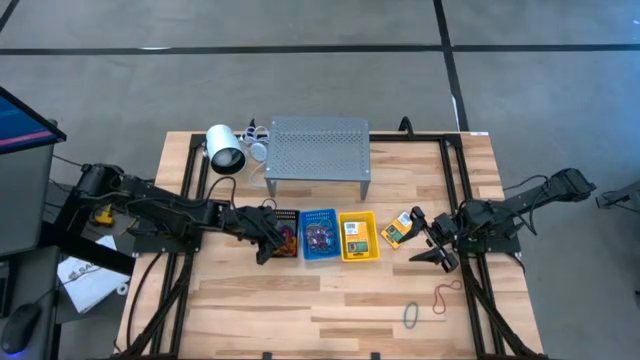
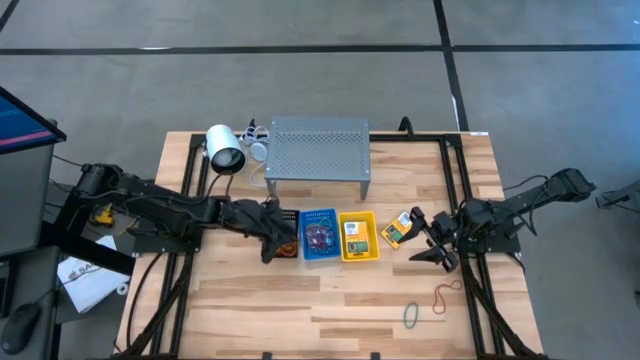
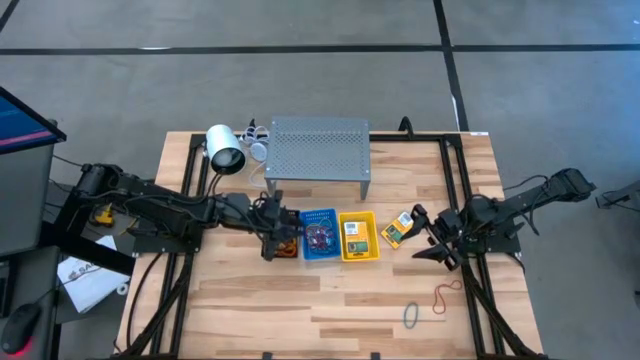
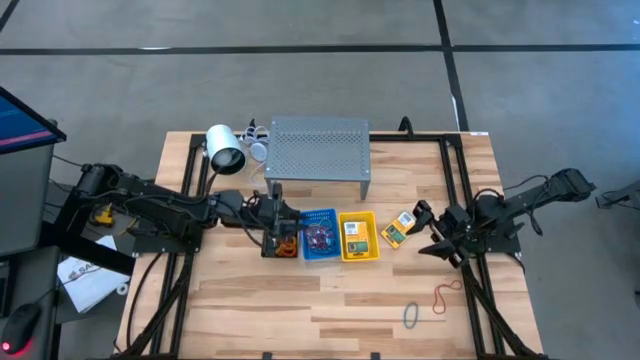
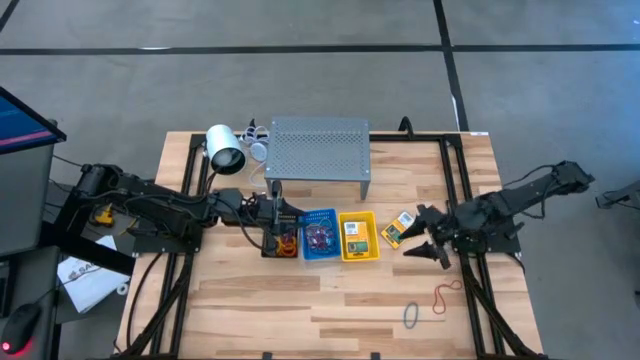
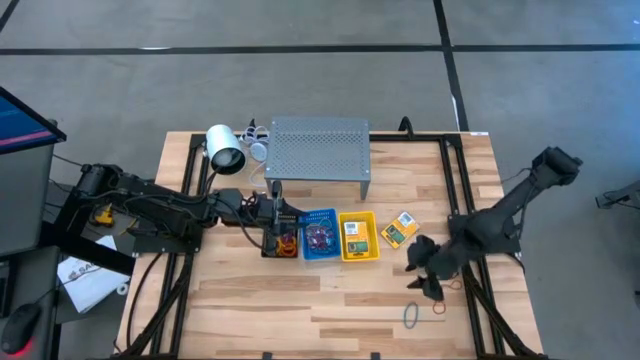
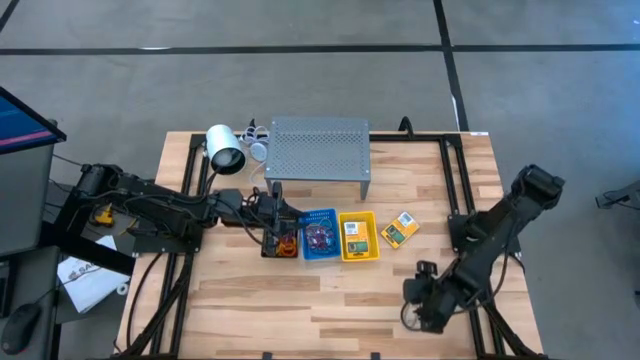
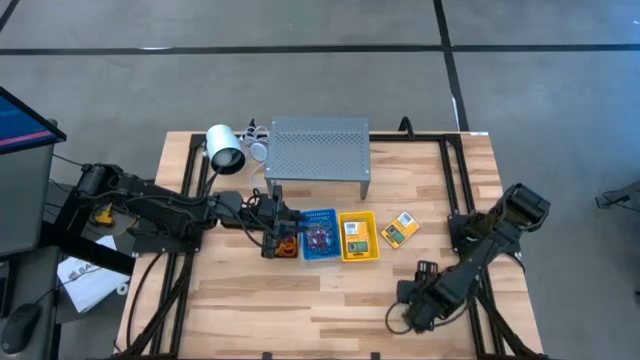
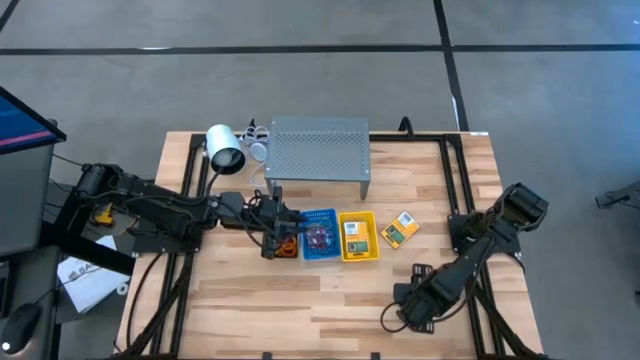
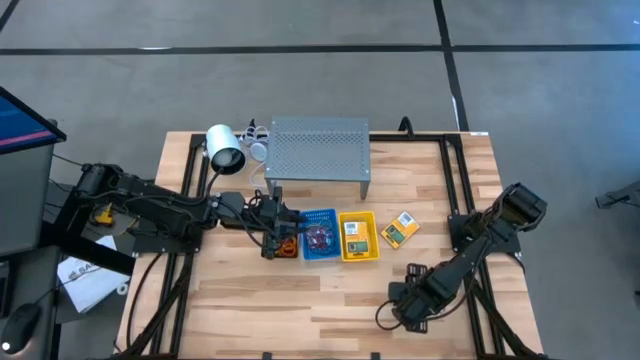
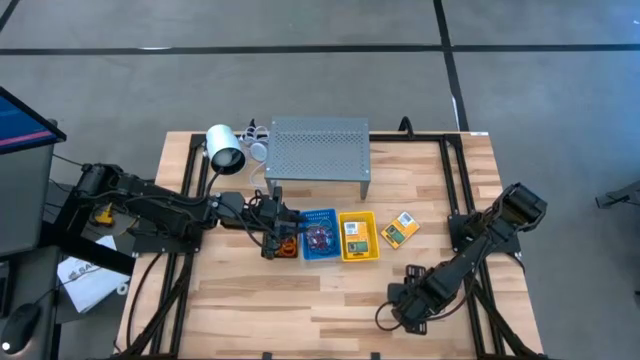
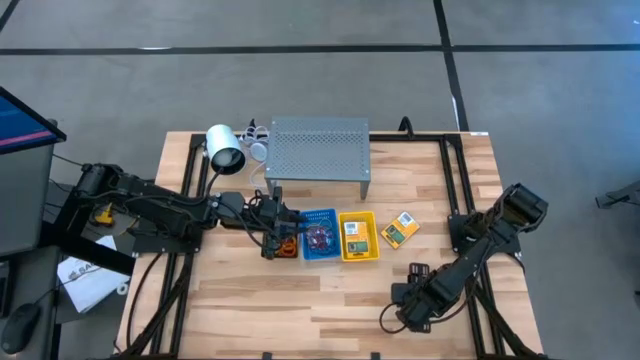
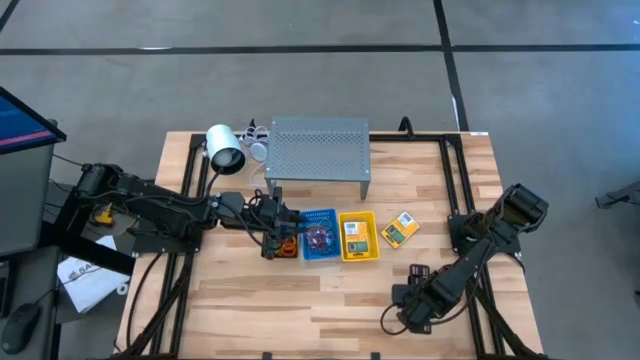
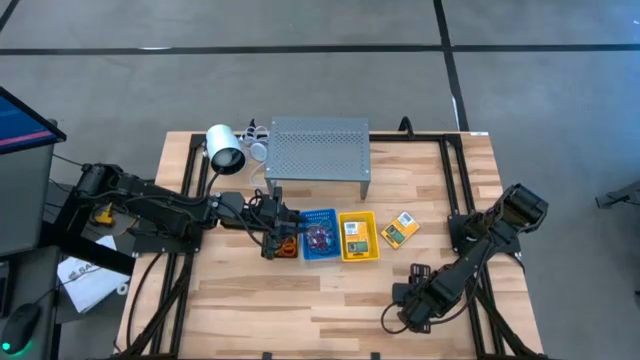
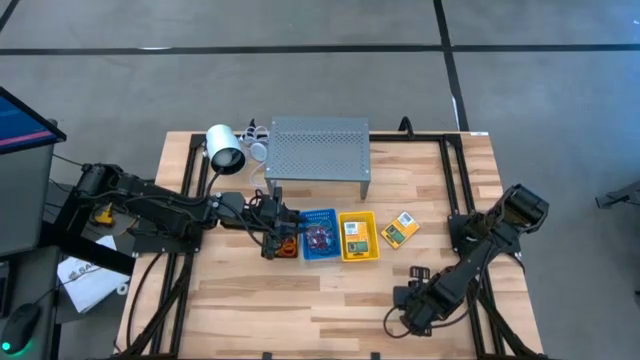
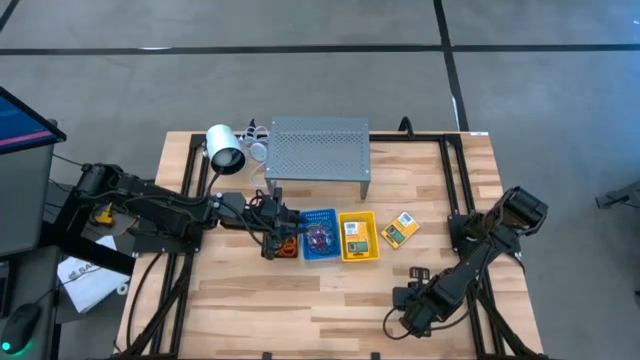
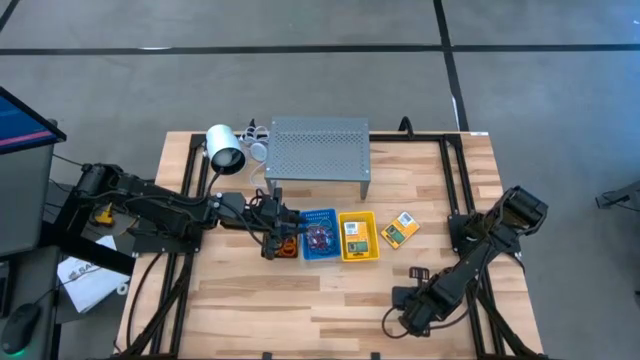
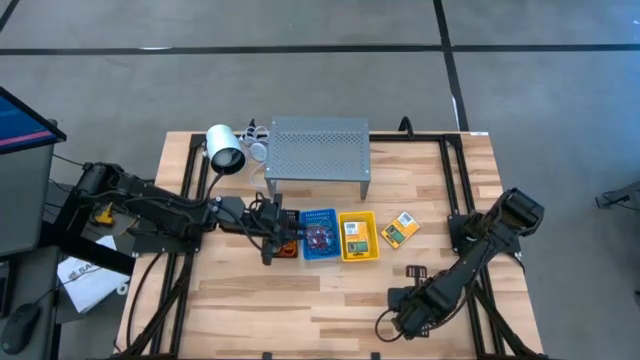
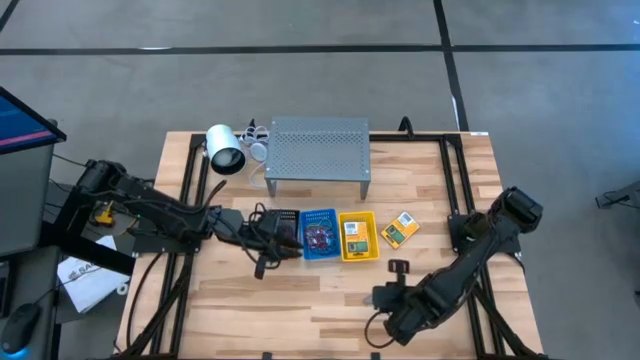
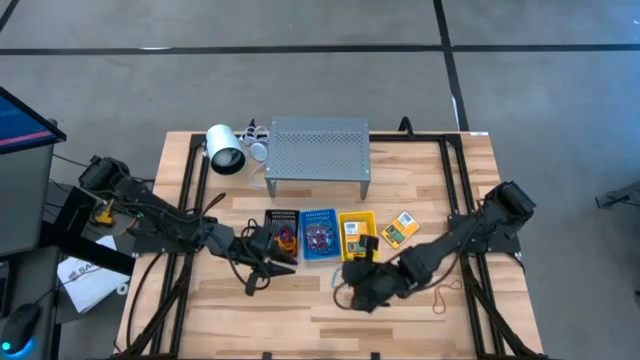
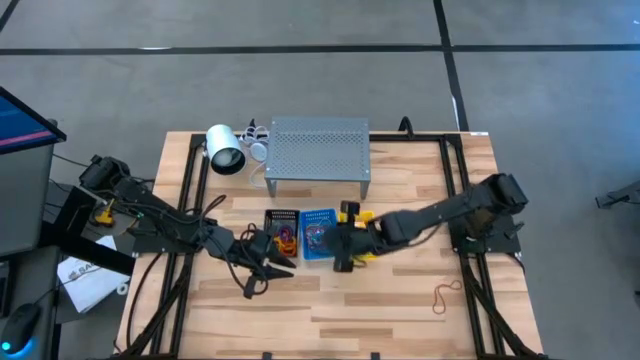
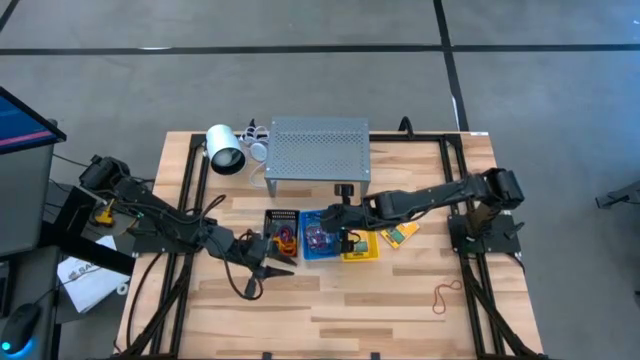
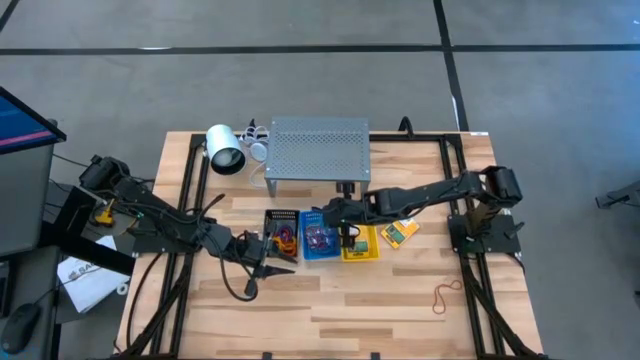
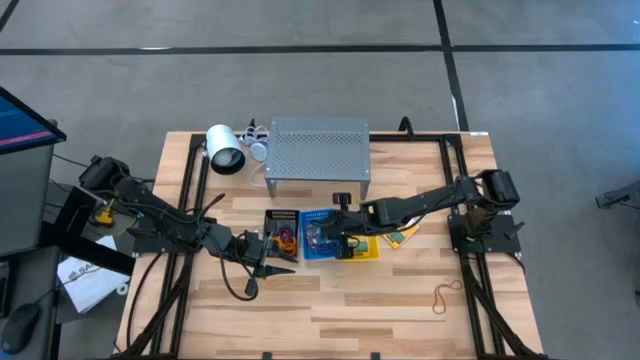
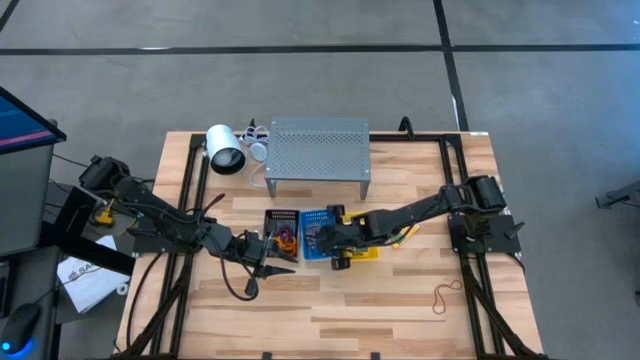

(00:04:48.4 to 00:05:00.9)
Task: Pick & Place Office Desk Supplies
Put the blue rubber band into the blue basket

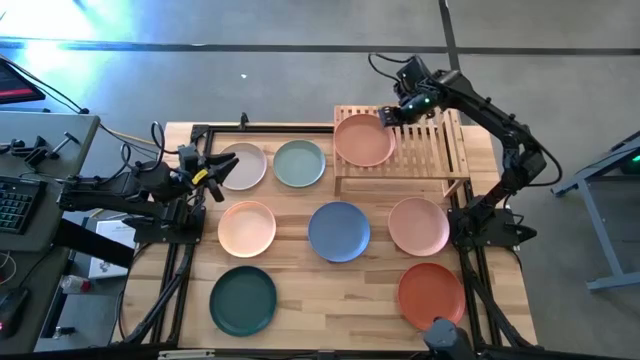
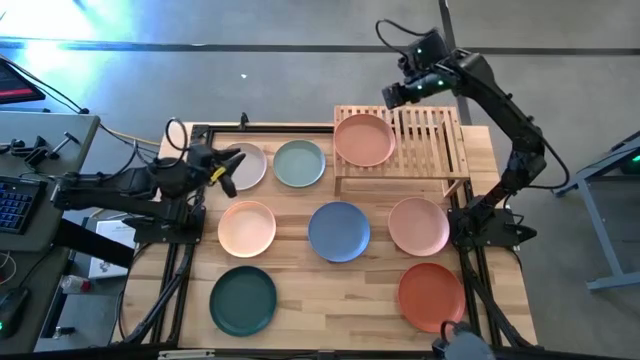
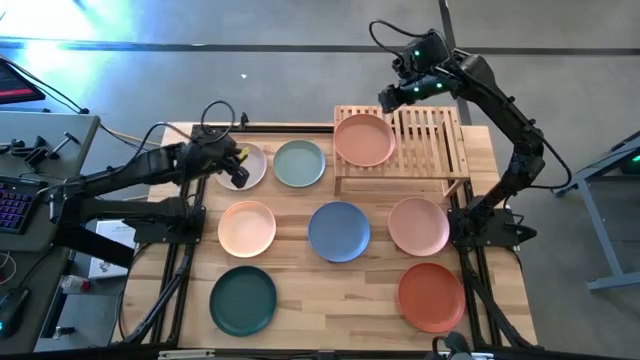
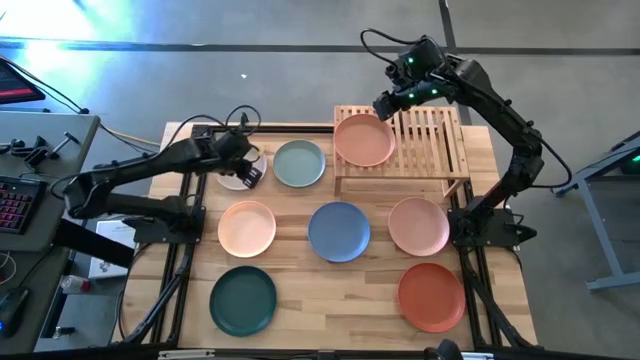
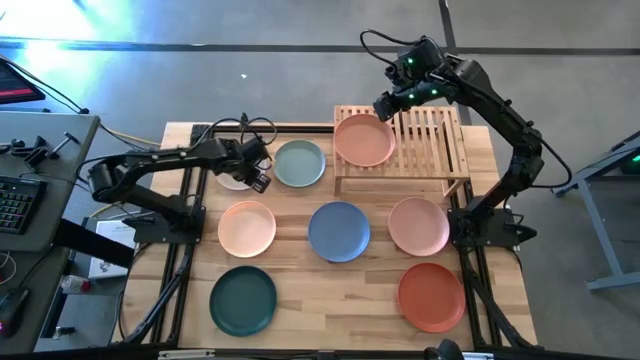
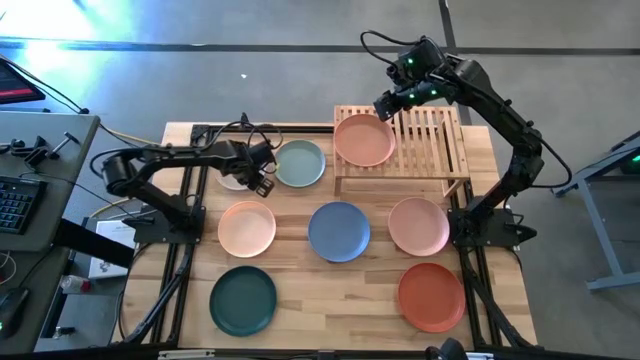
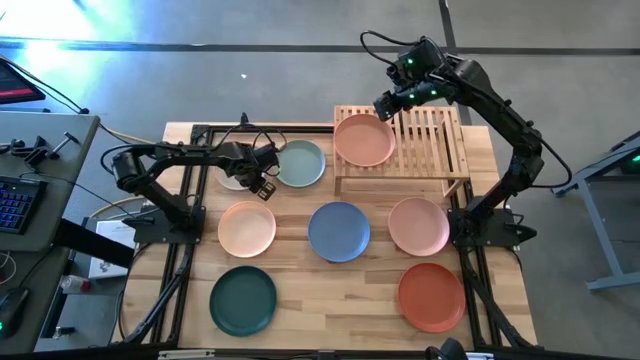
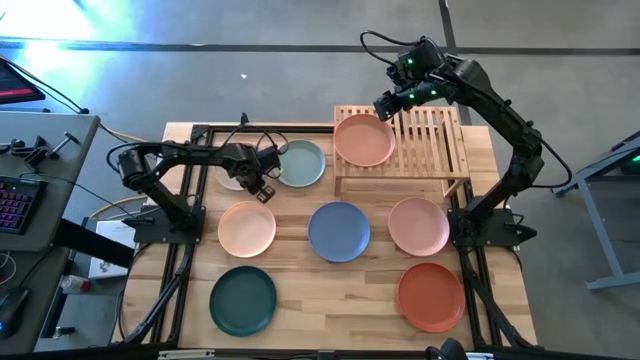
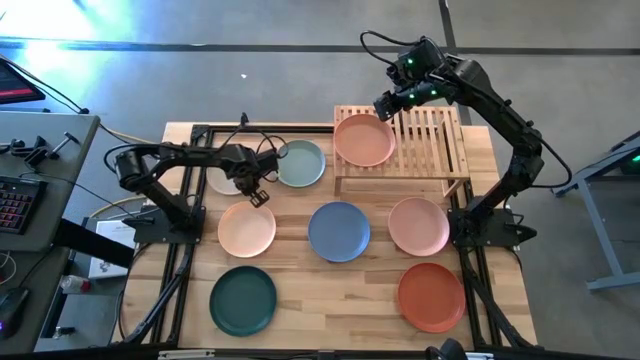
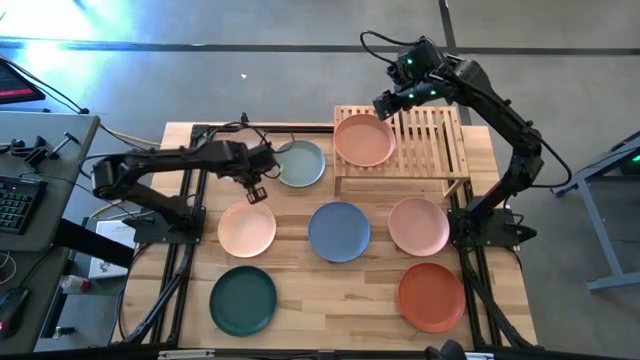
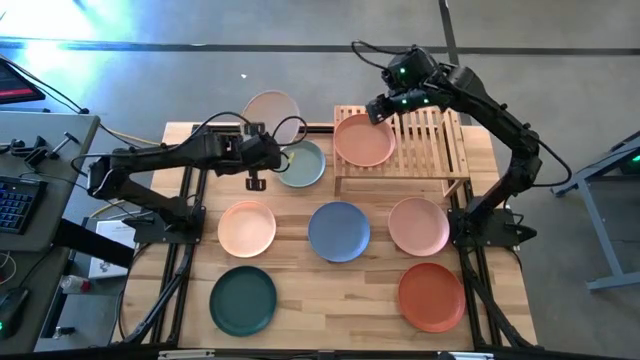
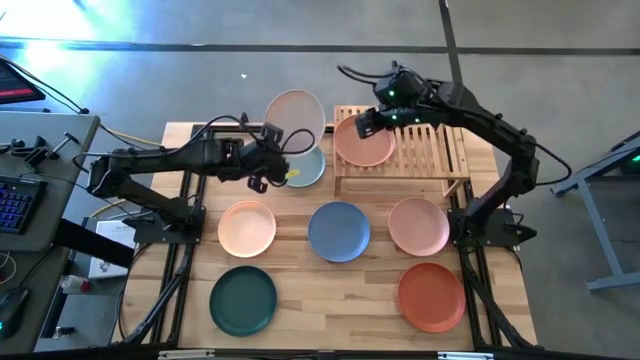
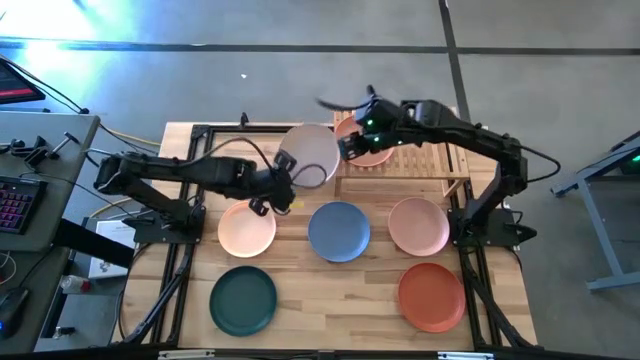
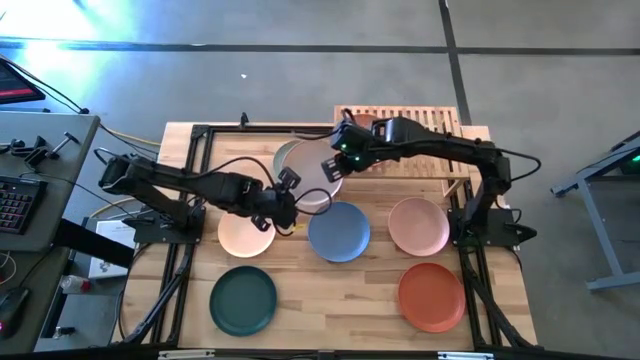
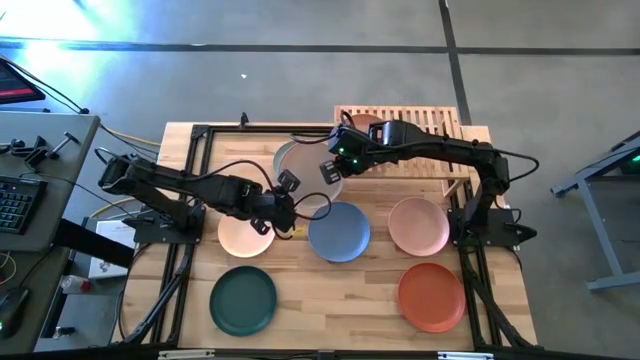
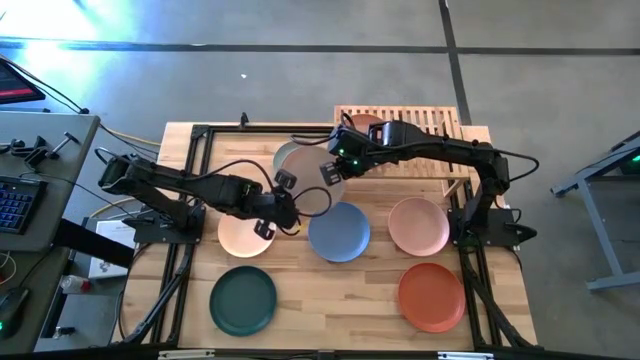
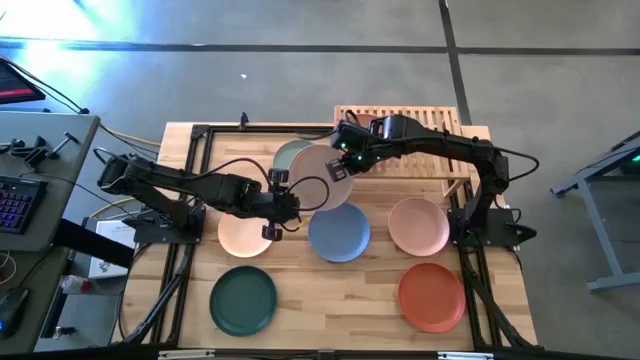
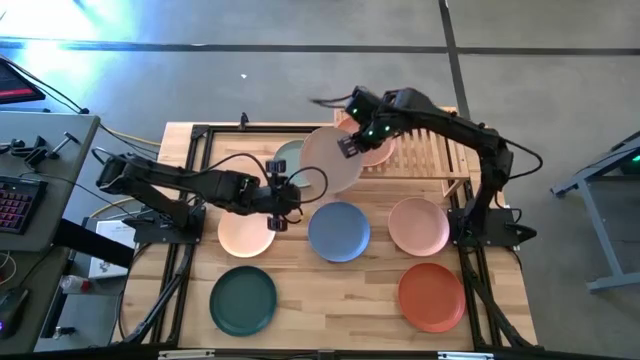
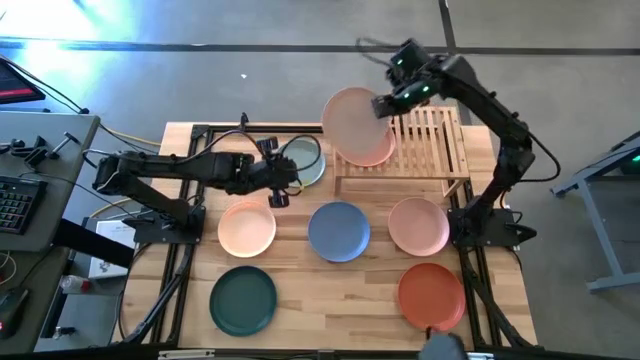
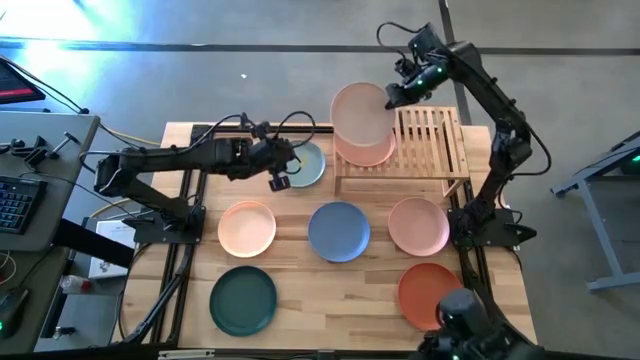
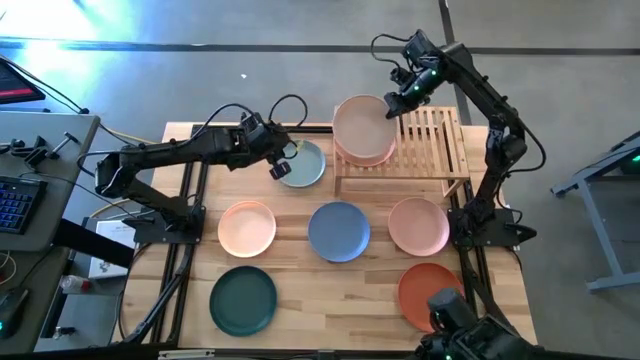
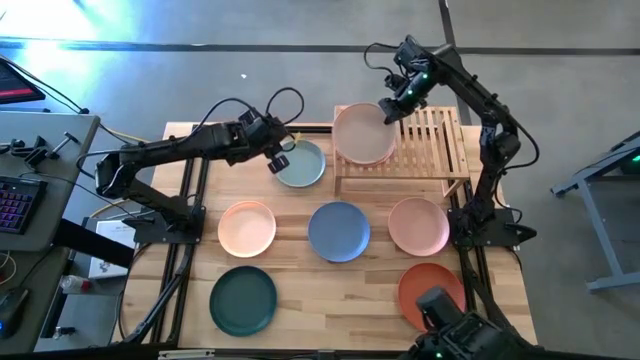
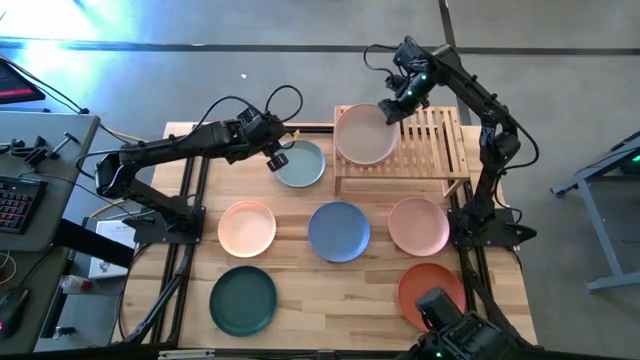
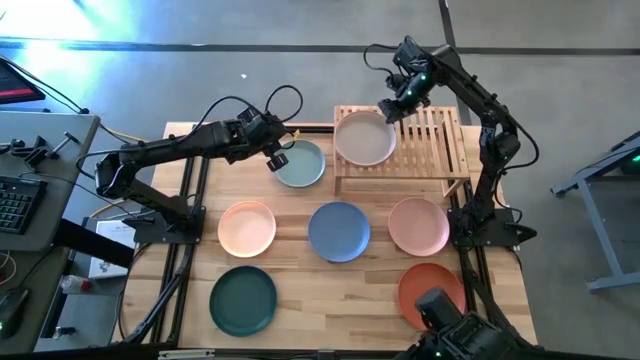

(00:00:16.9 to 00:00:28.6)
Task: Place and stack plates onto a shelf
Stack the white plate on top of the brown plate on the shelf
